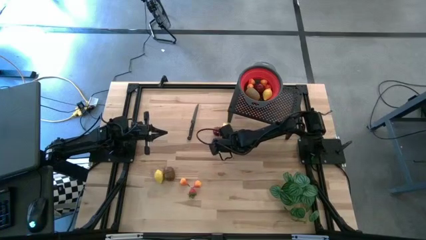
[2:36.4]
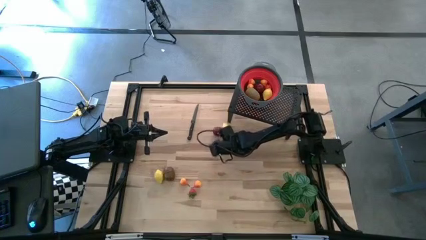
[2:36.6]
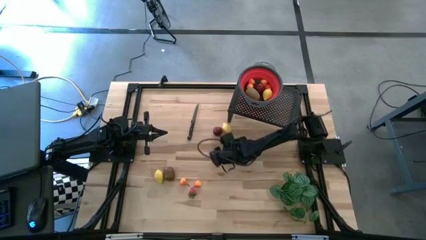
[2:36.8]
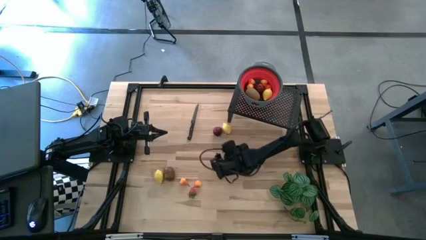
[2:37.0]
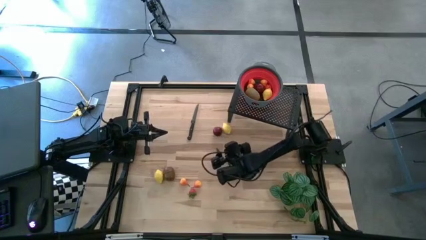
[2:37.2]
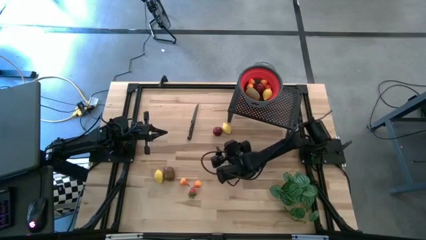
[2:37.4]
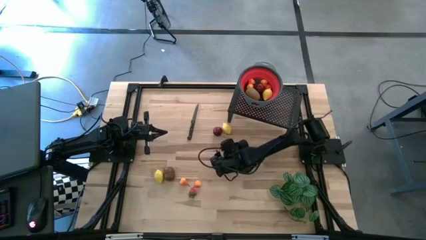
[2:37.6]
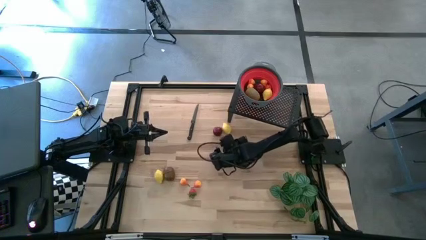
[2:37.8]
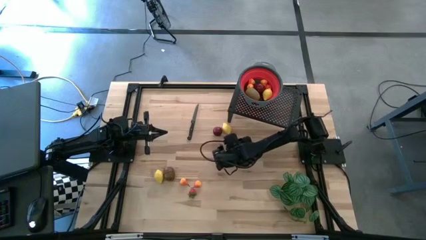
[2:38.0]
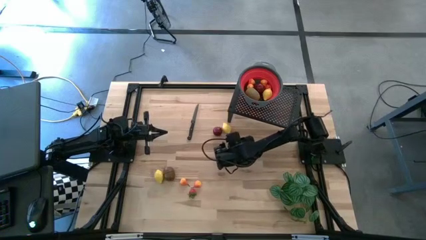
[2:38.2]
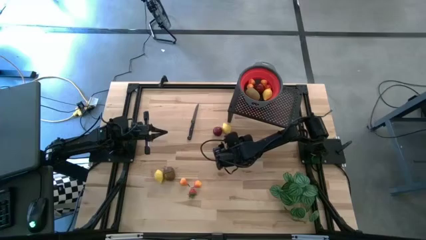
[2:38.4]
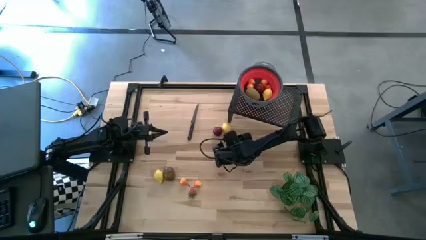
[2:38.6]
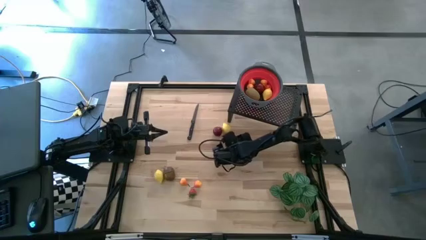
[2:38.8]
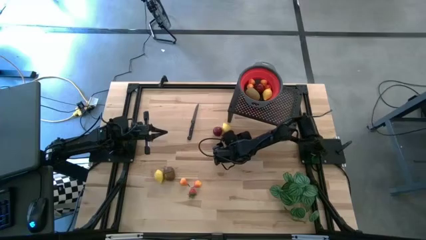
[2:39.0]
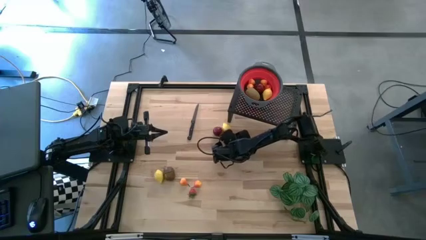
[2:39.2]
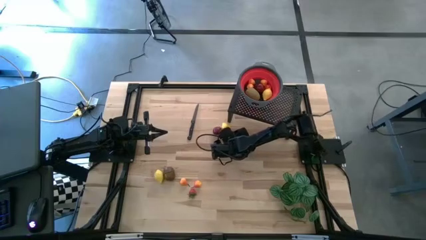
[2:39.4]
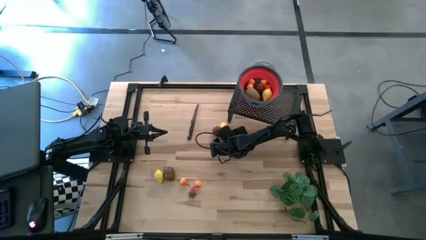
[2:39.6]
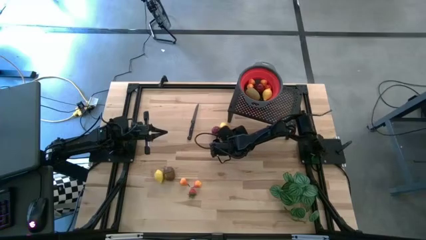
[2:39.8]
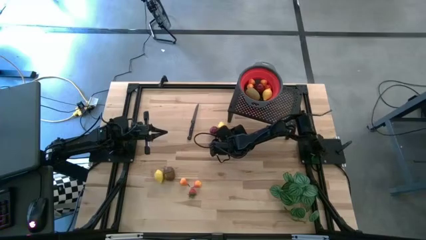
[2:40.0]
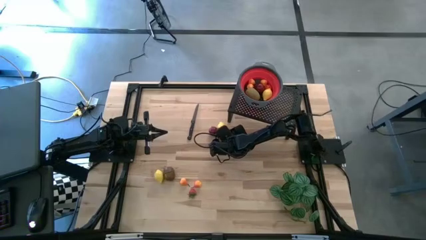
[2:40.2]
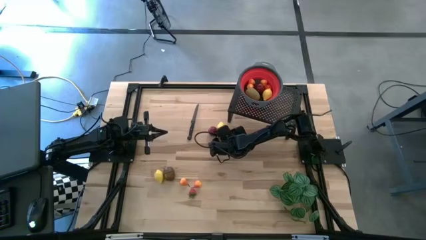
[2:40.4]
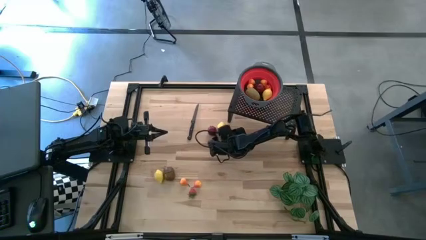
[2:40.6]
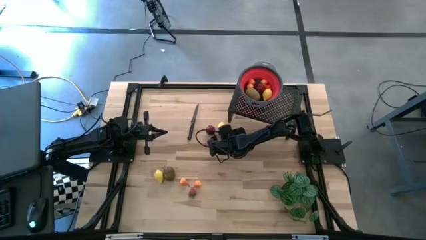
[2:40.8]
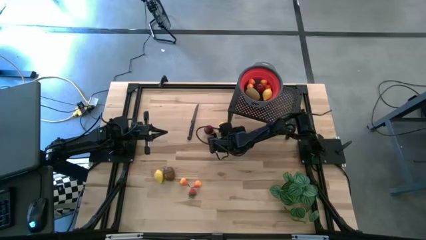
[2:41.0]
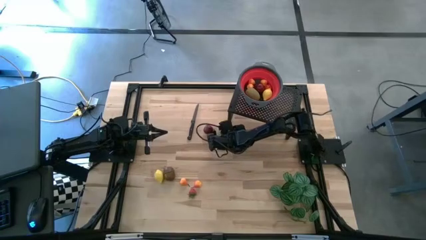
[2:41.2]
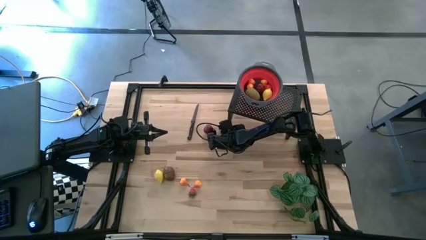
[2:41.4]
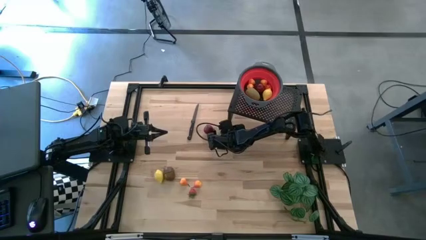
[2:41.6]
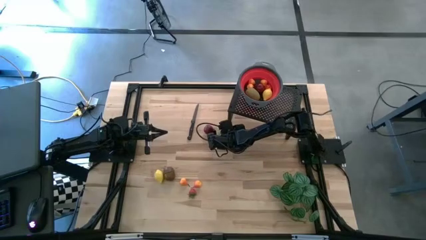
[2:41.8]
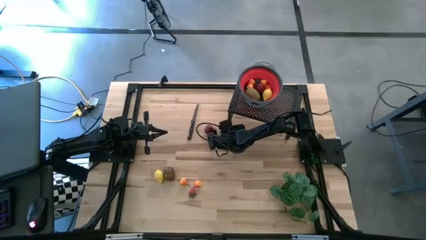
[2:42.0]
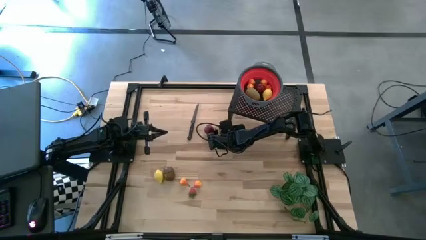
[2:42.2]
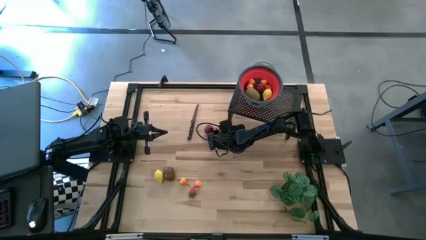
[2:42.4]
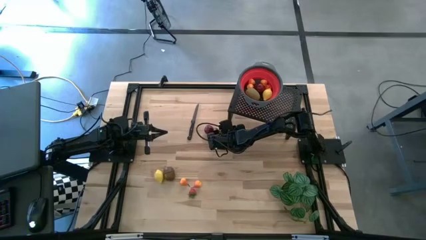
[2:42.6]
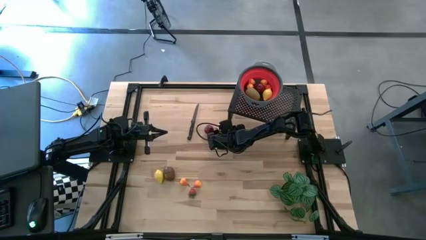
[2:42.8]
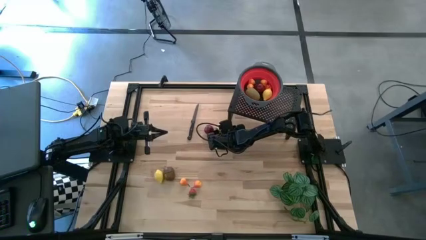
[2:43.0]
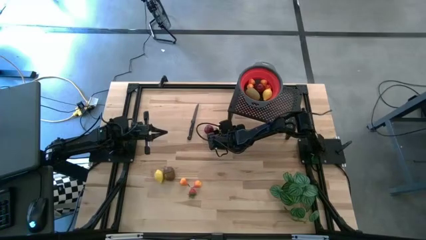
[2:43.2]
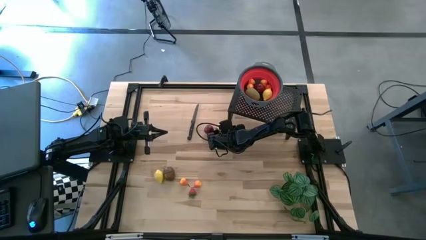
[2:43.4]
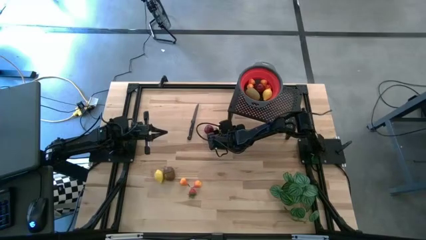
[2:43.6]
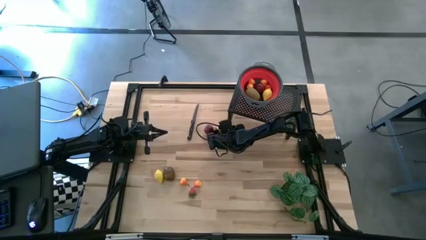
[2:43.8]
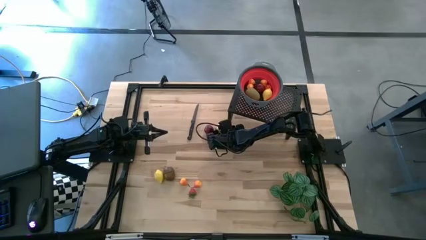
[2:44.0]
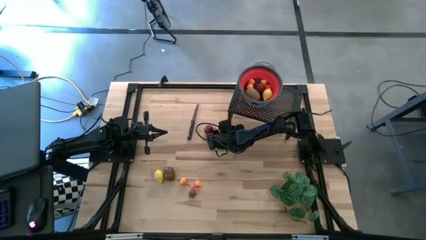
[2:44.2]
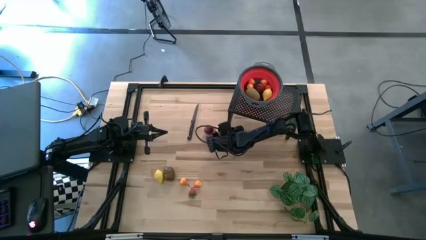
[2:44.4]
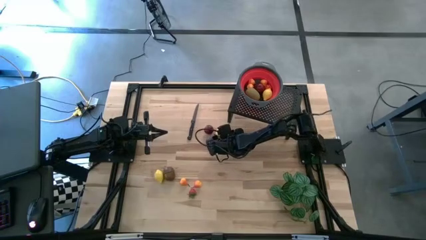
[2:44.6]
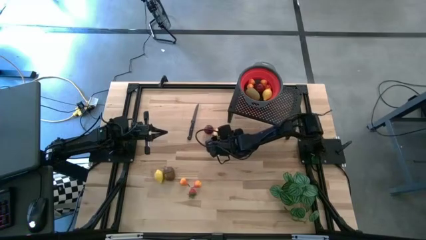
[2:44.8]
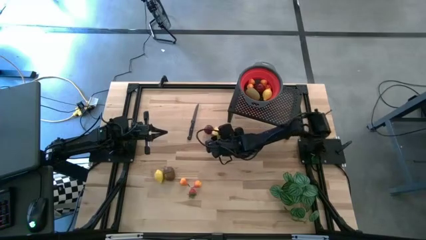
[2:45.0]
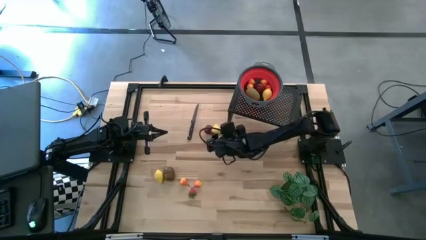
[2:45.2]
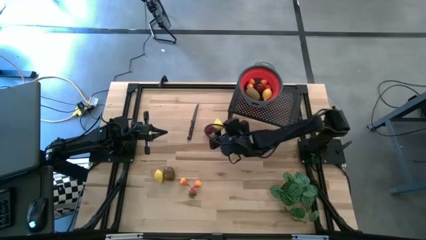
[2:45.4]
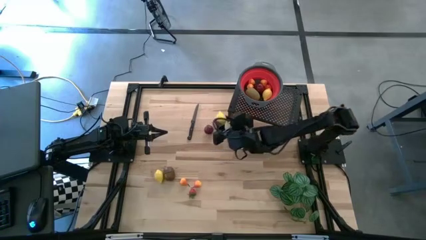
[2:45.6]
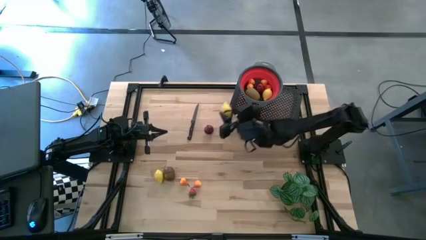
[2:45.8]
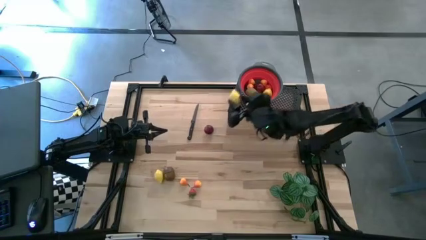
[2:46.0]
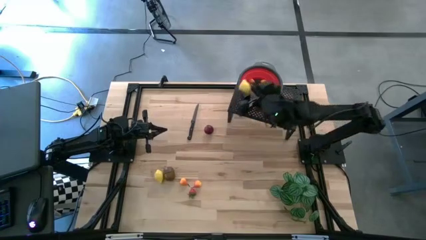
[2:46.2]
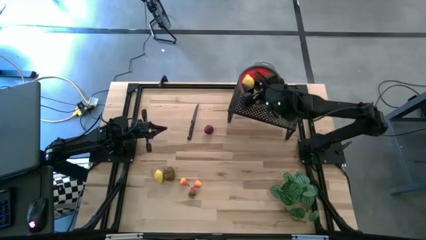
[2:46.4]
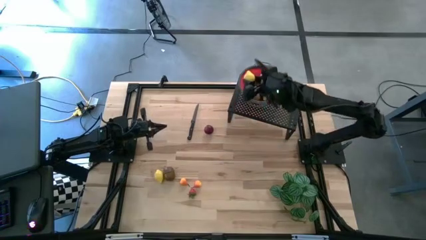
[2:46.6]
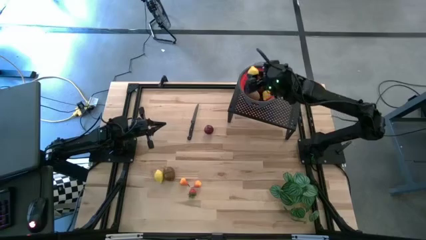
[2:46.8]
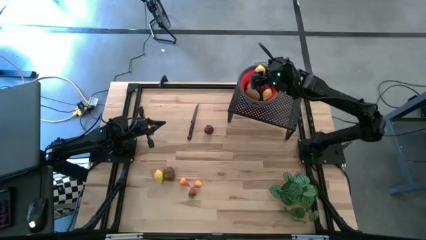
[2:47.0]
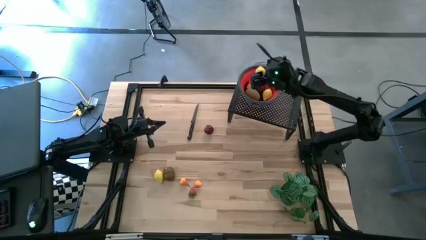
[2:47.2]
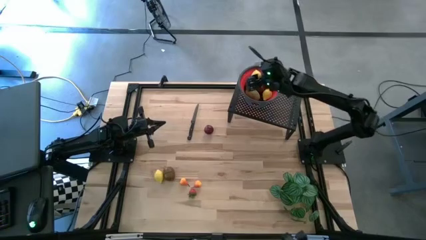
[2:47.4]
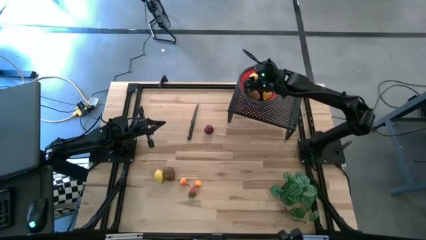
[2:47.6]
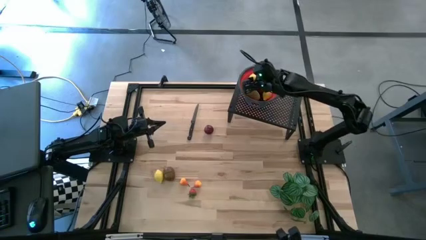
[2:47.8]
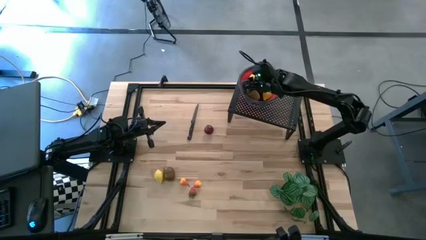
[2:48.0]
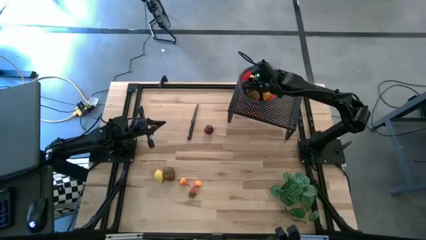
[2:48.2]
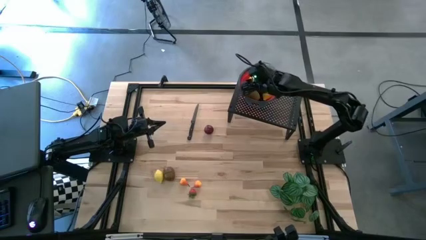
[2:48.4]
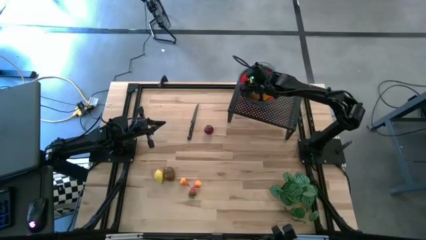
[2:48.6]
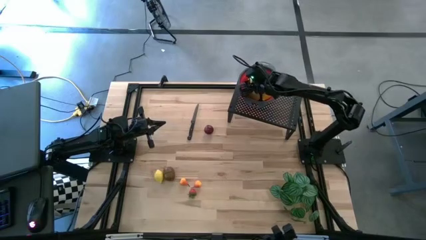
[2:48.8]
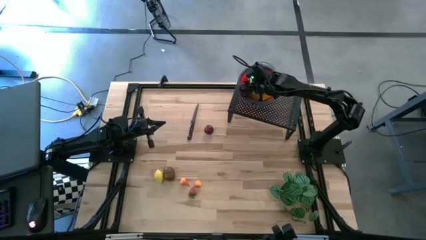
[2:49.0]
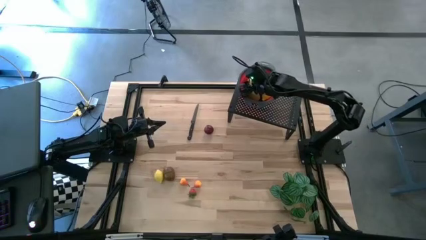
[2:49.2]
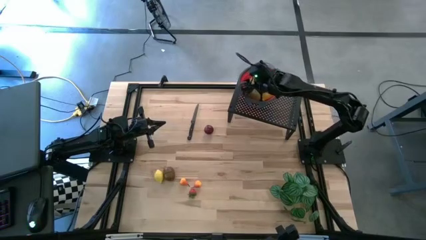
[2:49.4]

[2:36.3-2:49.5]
Task: Pick & Place Fruit
Put the yellow lemon into the red strainer bowl on the shelf

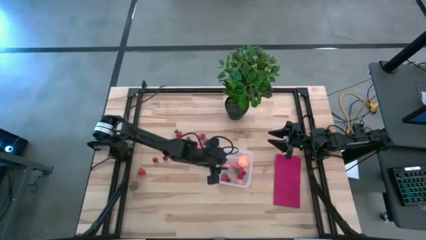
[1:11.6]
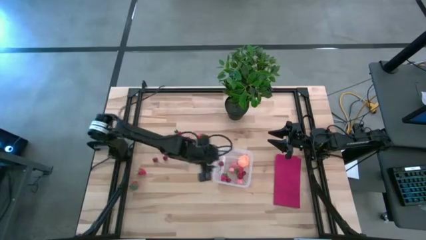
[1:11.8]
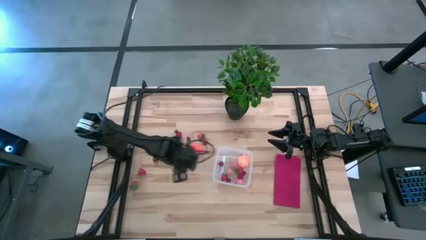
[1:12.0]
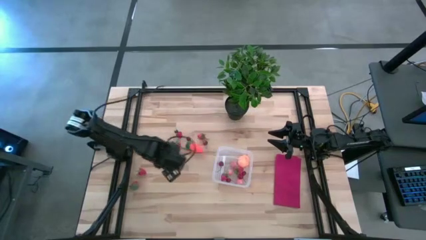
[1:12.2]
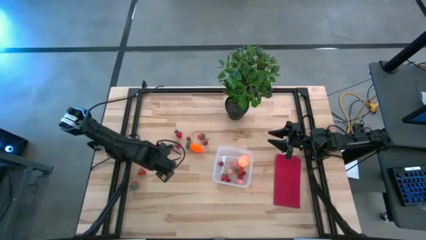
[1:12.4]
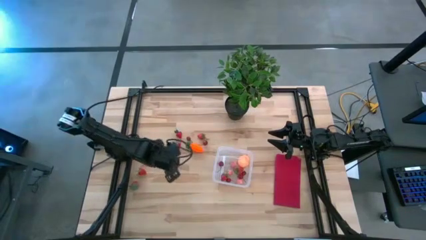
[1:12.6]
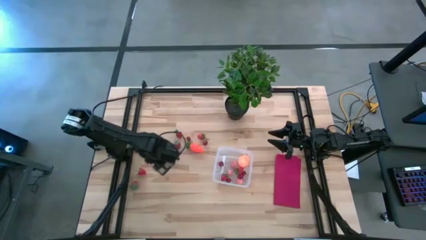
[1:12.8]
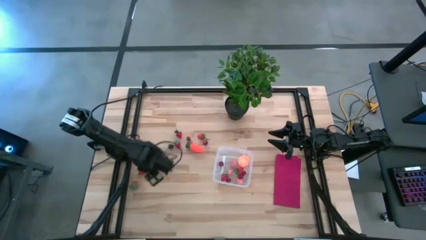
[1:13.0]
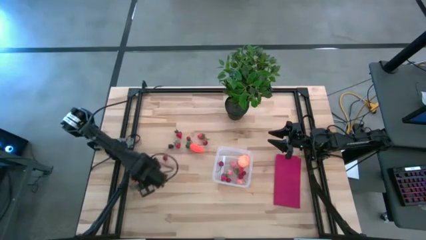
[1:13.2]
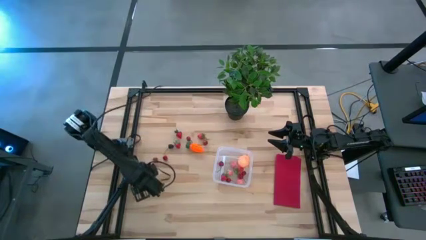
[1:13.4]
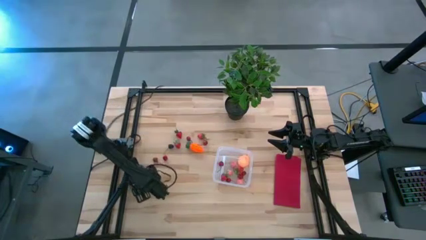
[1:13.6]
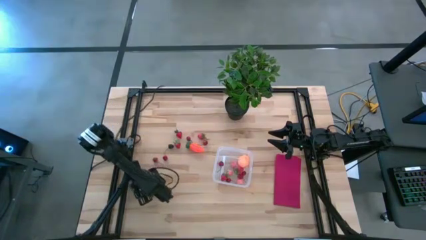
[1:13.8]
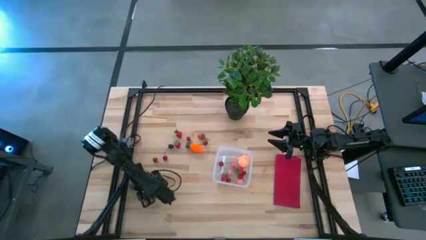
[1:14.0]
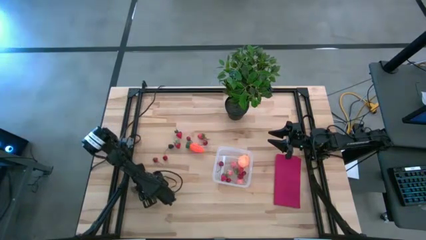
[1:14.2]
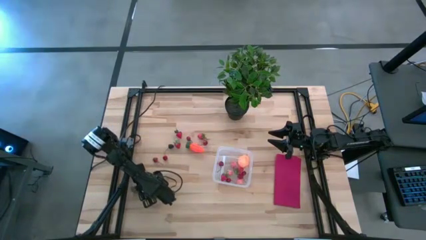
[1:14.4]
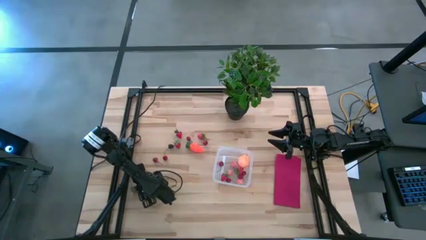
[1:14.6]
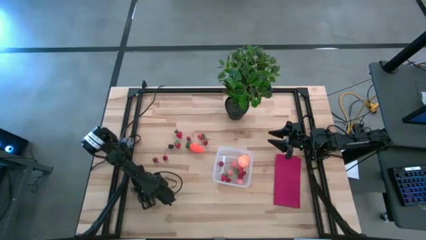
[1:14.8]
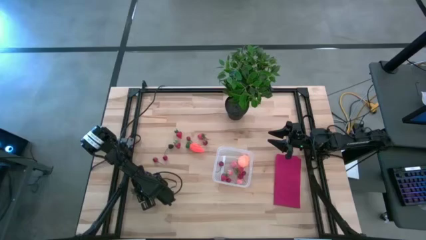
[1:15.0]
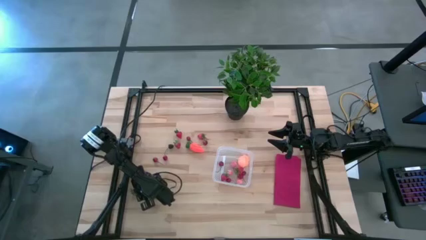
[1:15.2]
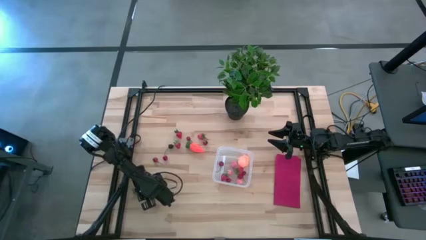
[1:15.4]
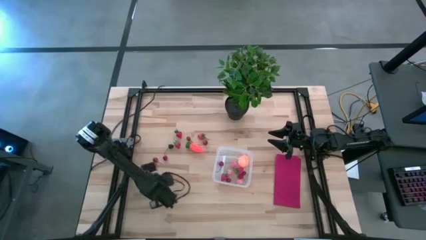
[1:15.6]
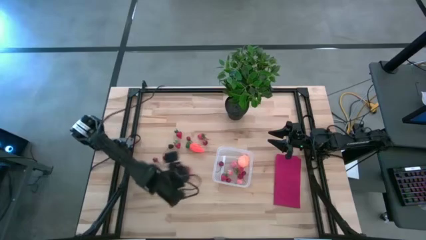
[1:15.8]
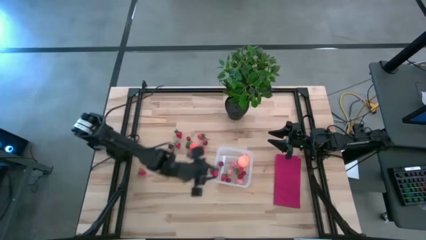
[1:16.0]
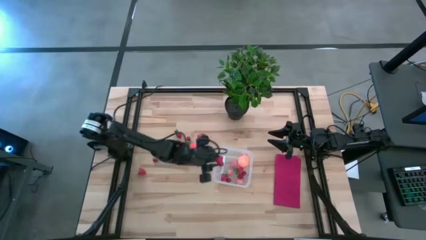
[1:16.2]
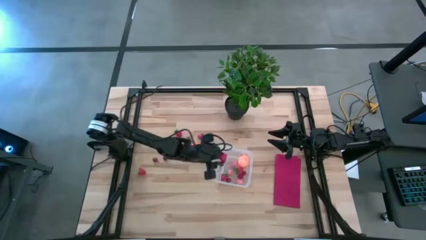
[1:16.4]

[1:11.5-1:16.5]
Task: Pick and placing Produce into tupperware
Put the red strawberry into the transparent bin
